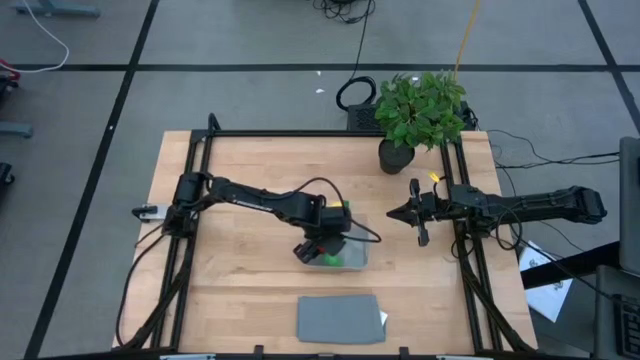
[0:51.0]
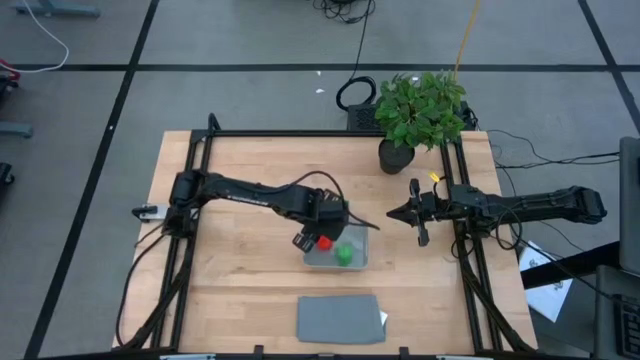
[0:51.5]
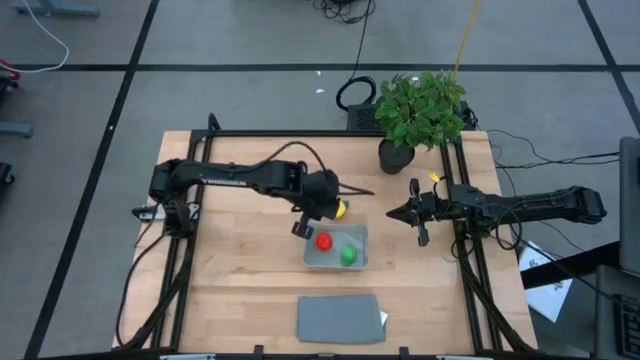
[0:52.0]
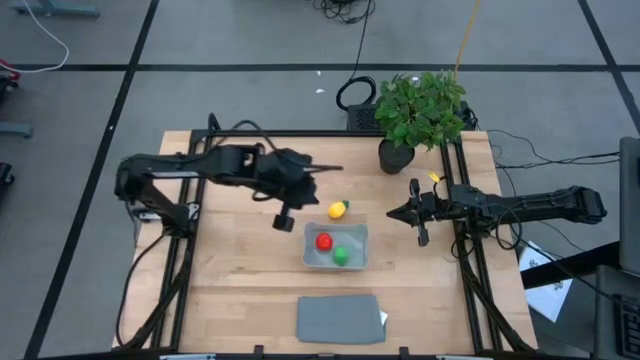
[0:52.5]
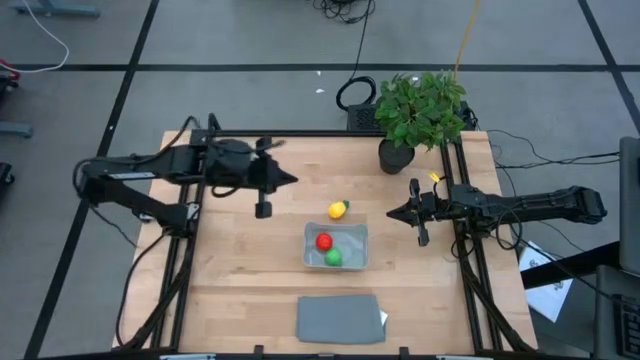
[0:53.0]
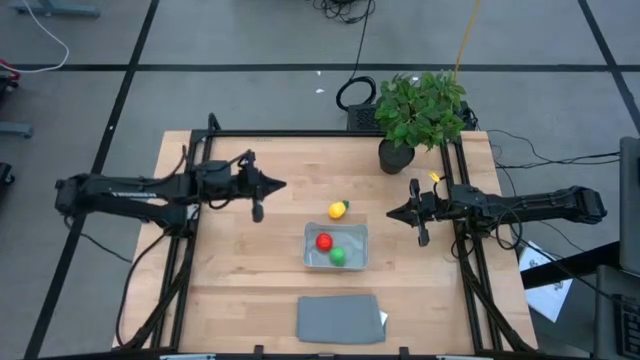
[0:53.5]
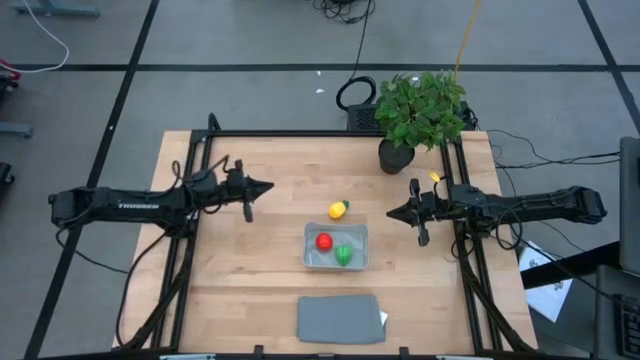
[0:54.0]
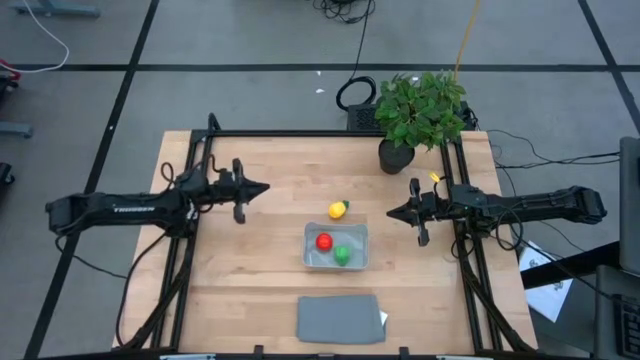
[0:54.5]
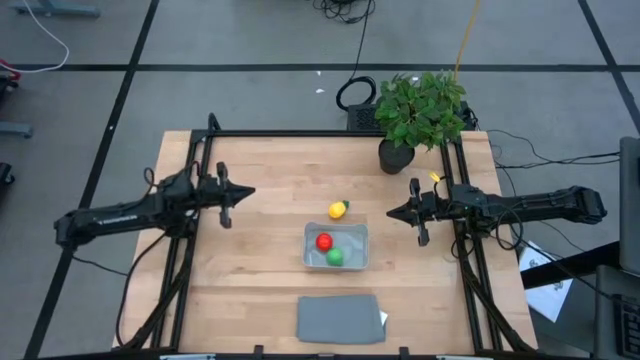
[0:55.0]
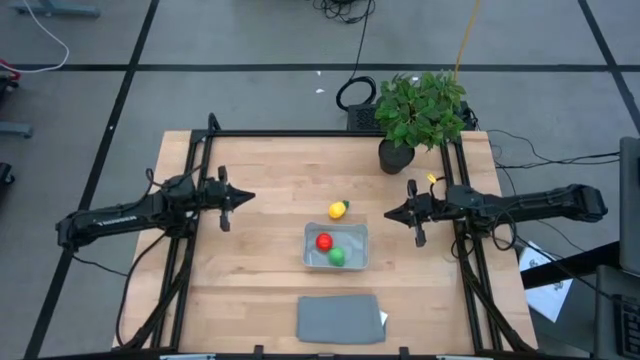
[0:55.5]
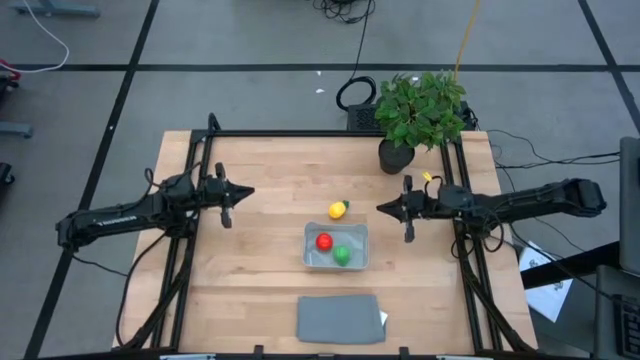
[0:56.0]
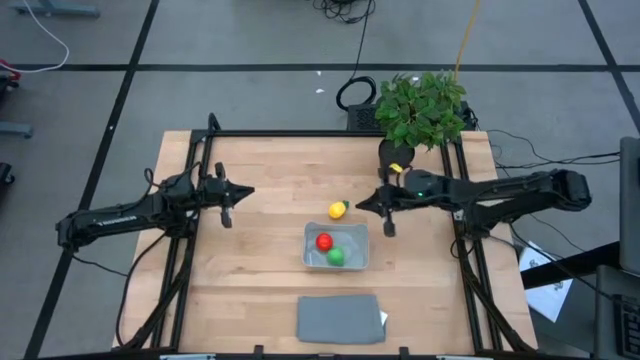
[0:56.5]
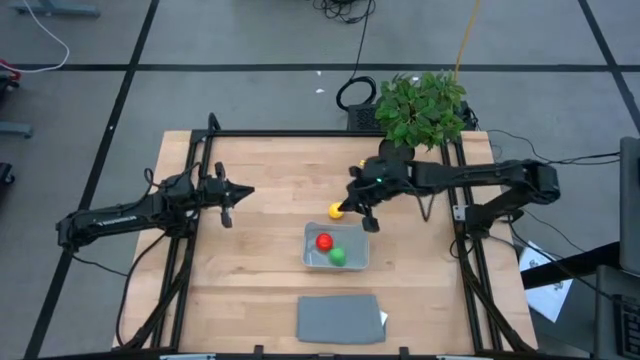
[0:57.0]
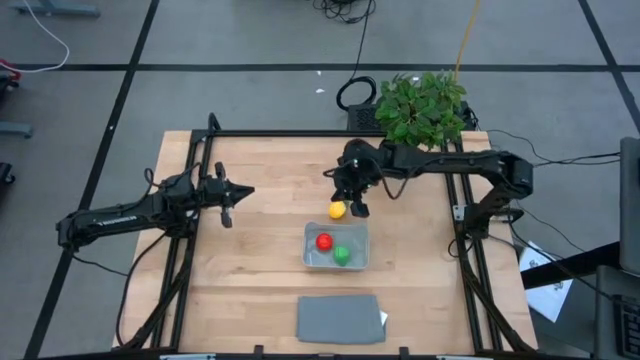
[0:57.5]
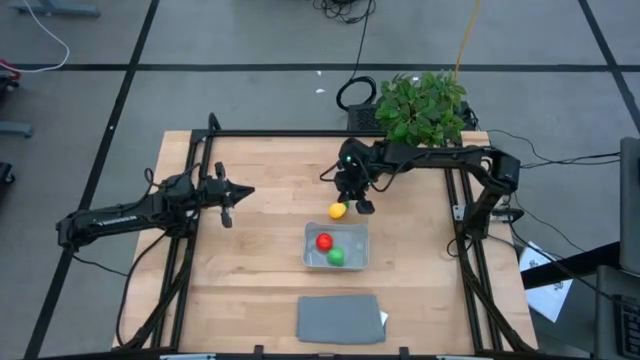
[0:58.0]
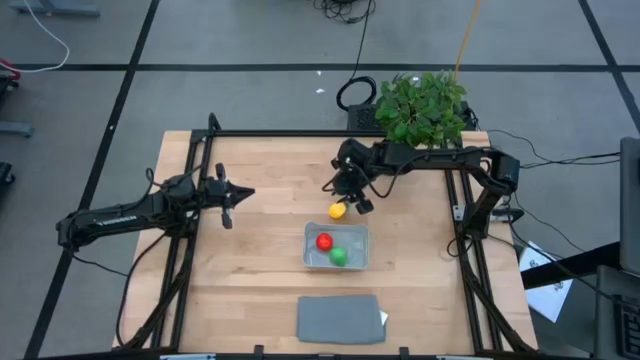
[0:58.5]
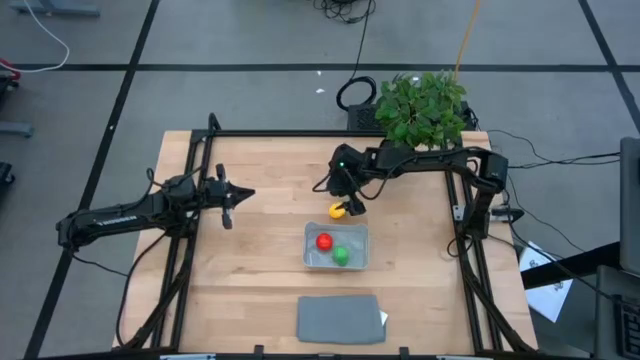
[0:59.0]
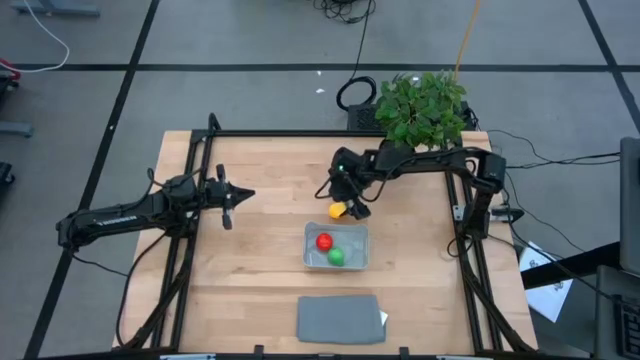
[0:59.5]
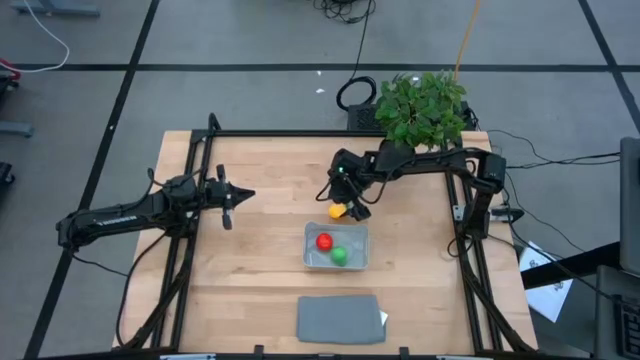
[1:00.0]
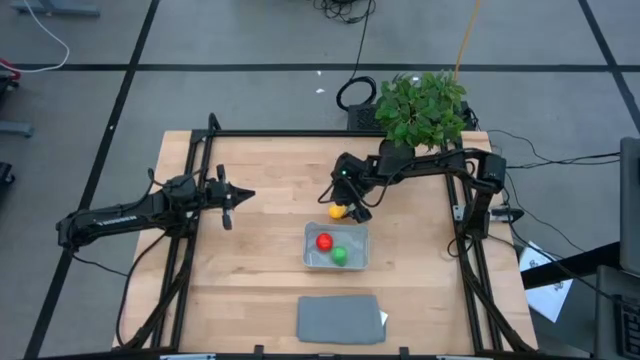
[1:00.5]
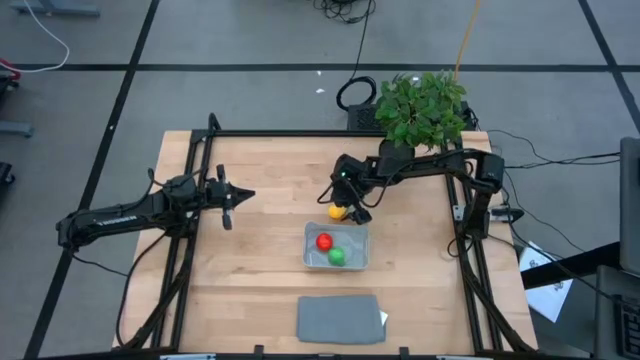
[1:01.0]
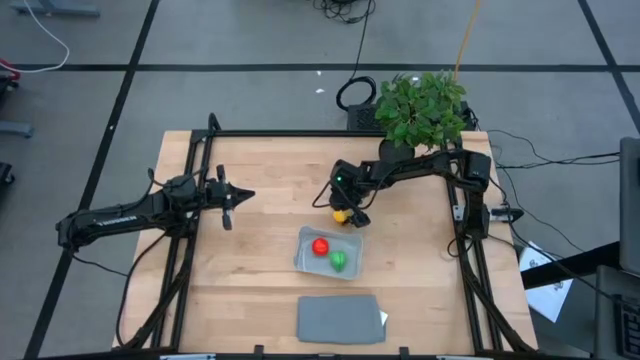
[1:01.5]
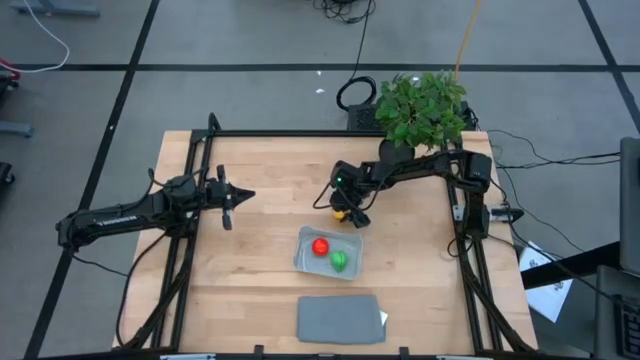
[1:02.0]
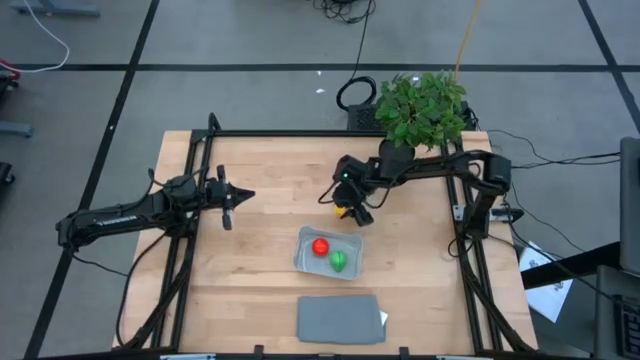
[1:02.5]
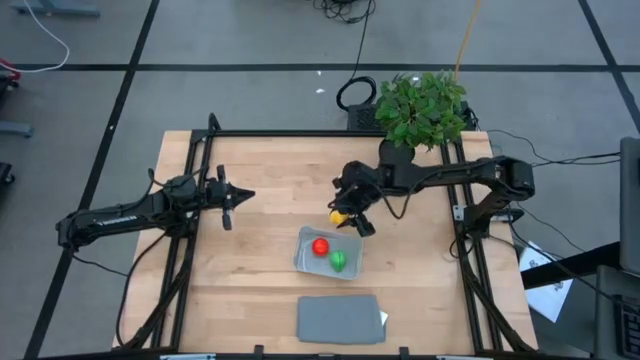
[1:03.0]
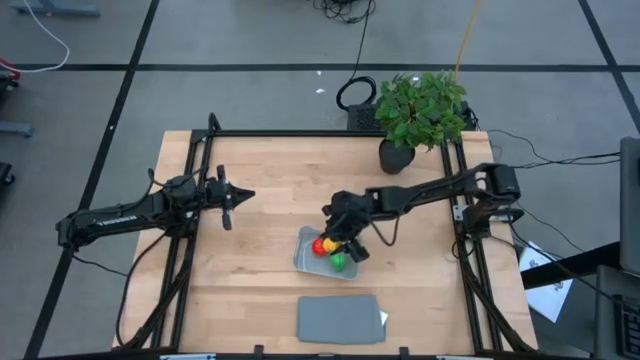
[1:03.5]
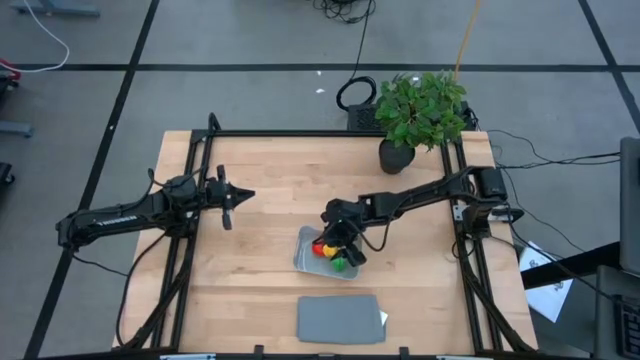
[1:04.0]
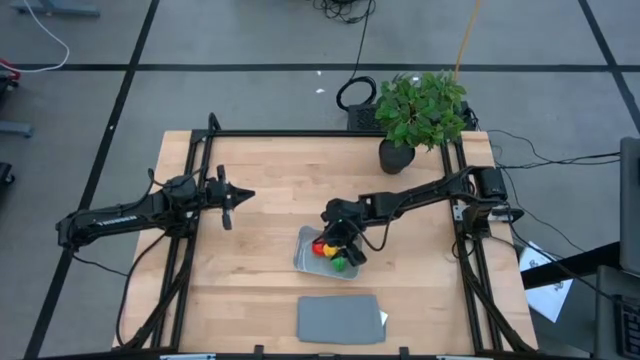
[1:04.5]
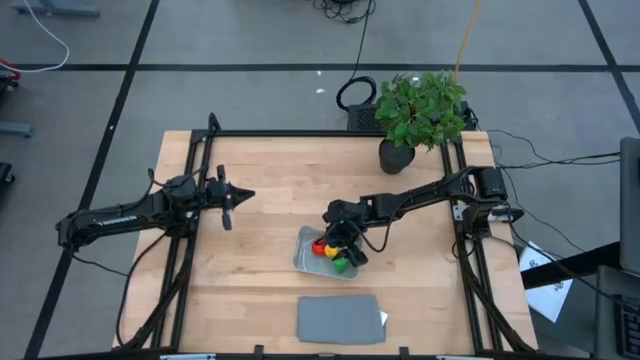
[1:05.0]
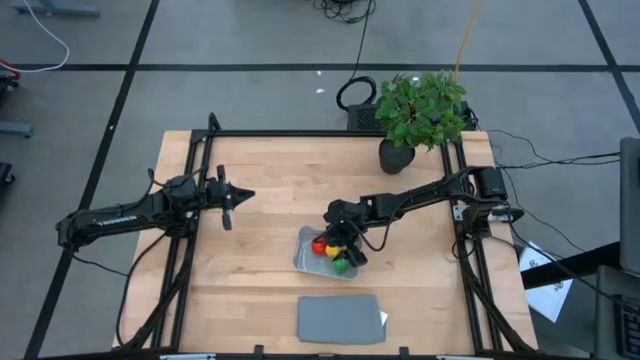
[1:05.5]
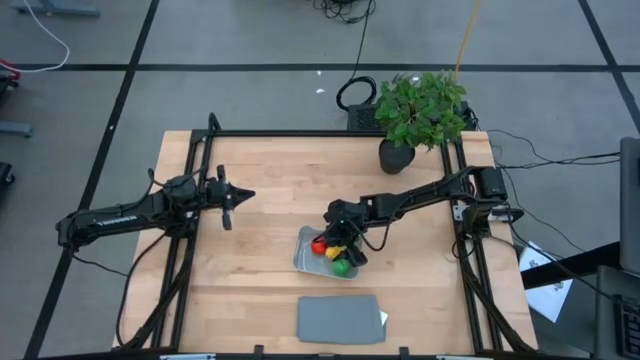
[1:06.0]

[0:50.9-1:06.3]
Task: Pick and placing Produce into tupperware
Put the pineapple into the gray bin

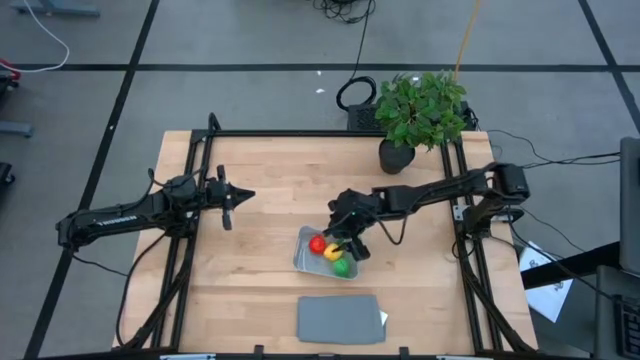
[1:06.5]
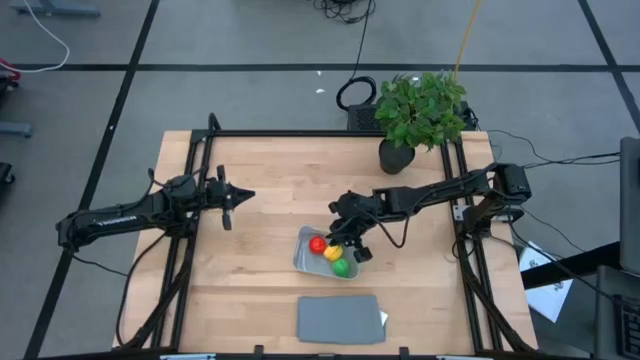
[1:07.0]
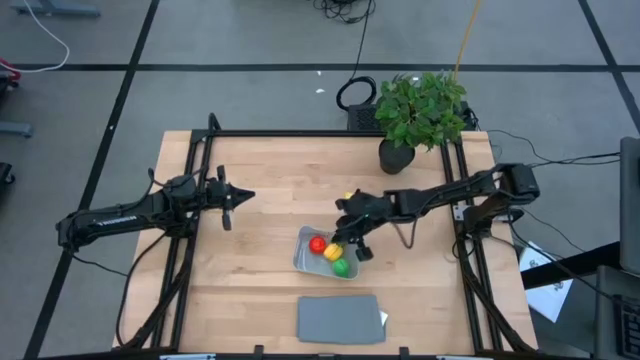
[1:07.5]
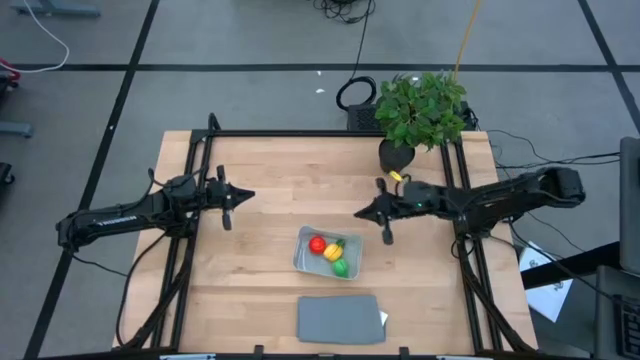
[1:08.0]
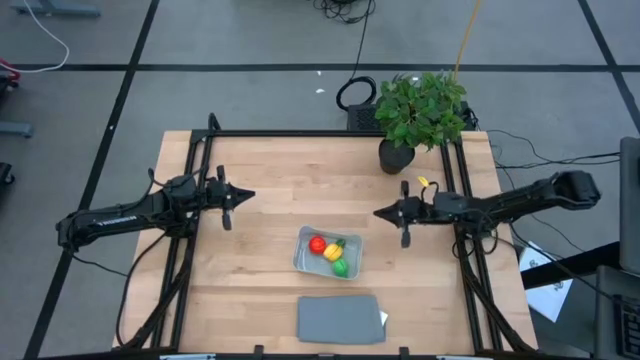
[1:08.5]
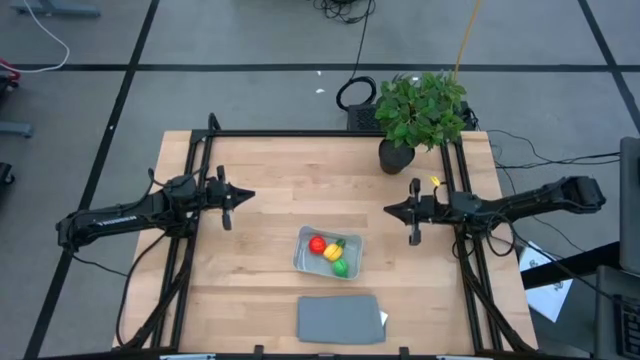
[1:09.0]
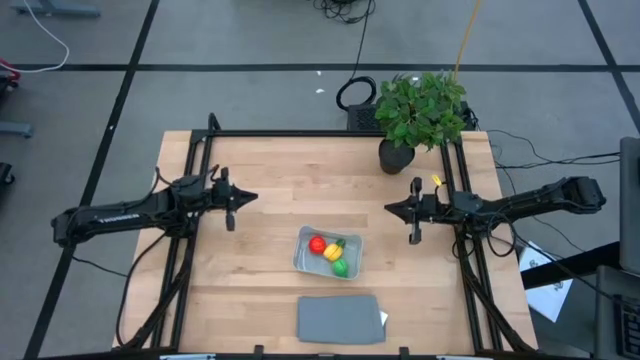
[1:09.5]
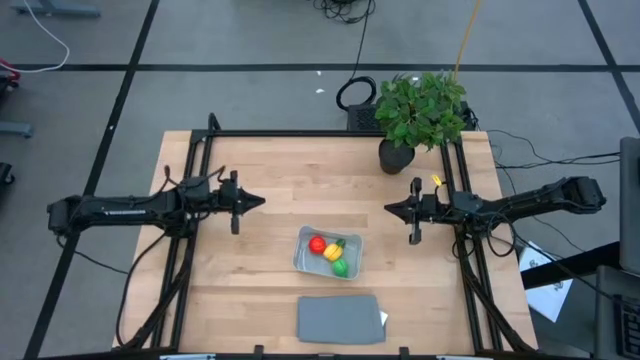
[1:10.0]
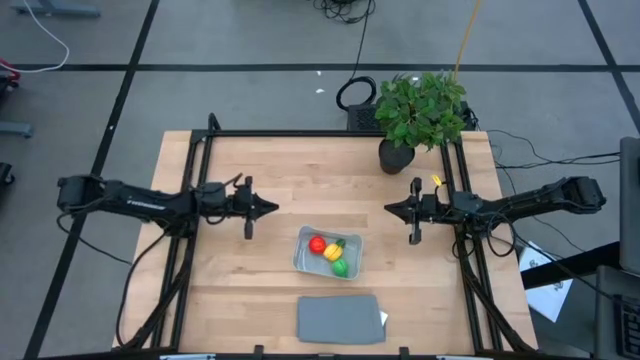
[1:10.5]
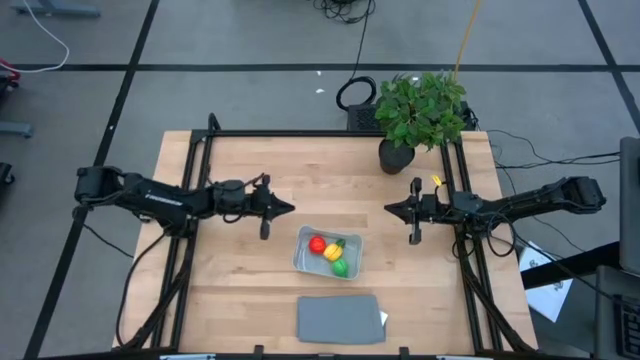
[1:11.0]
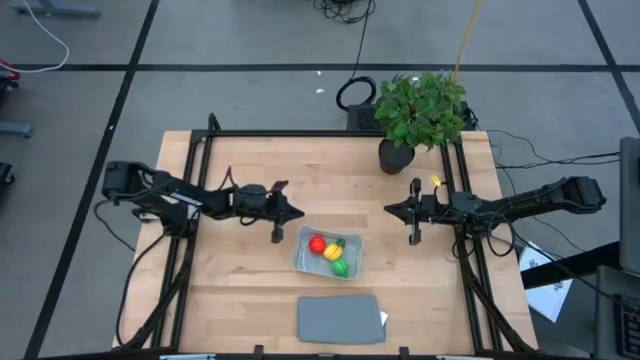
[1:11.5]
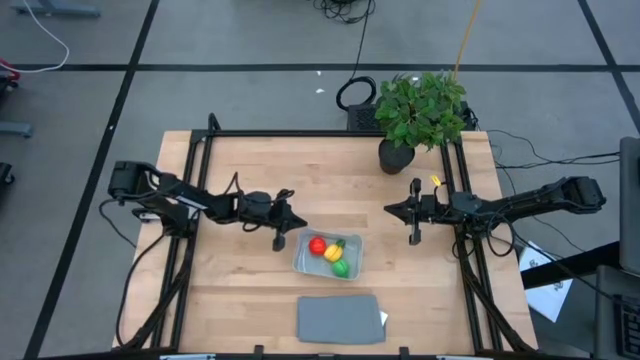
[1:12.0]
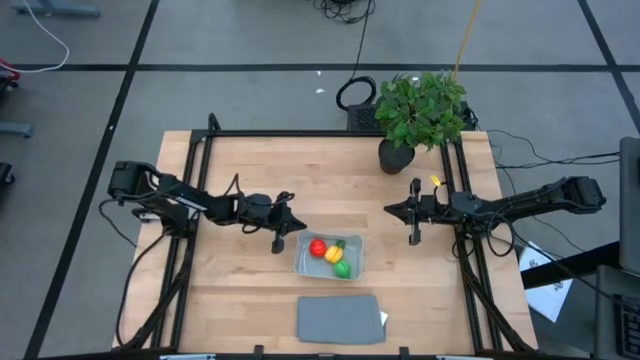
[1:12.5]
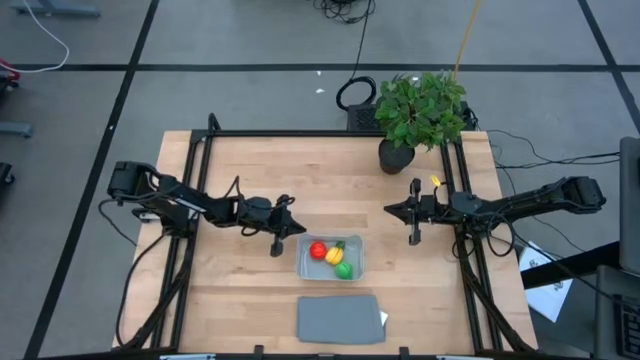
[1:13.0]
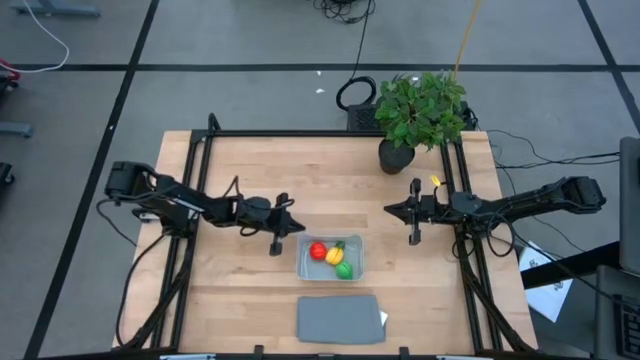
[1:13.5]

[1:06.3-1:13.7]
Adjust the gray bin
